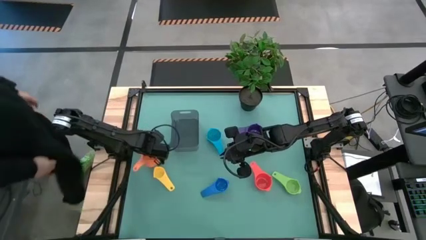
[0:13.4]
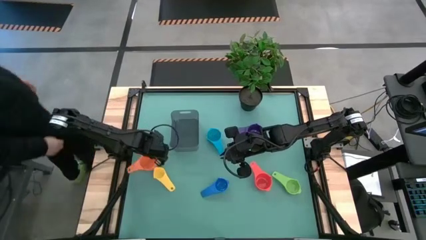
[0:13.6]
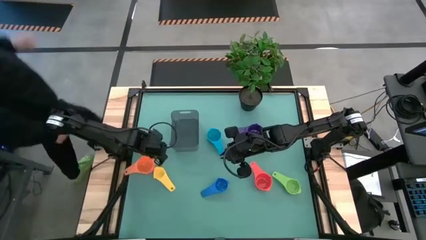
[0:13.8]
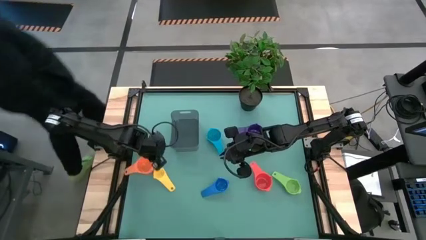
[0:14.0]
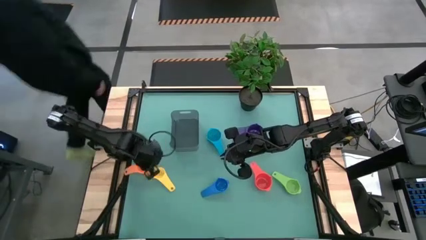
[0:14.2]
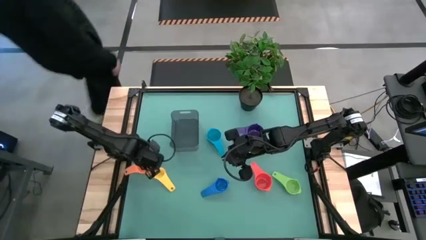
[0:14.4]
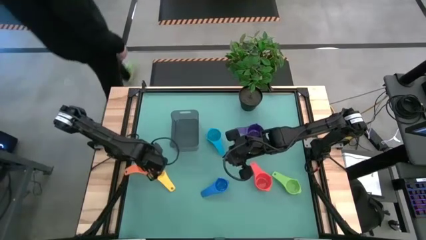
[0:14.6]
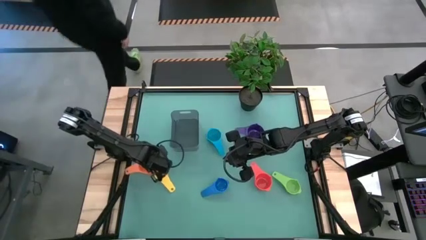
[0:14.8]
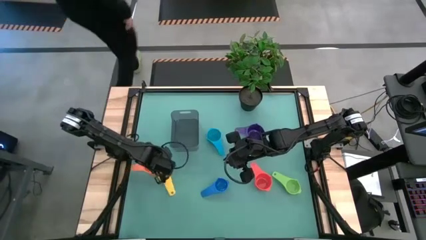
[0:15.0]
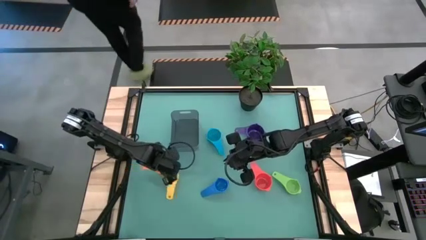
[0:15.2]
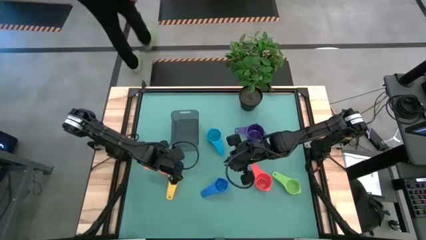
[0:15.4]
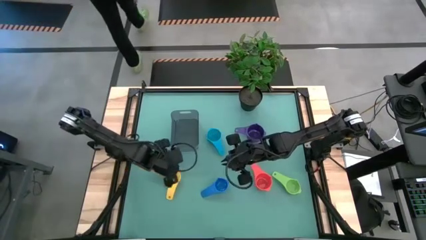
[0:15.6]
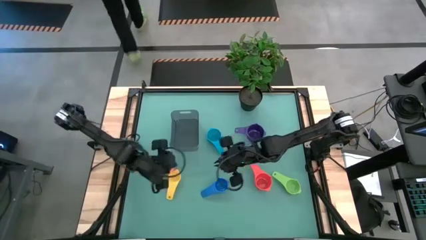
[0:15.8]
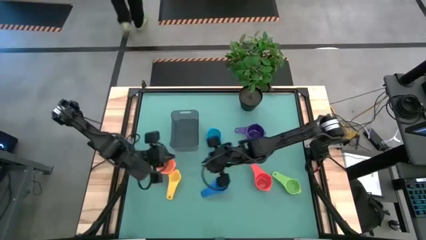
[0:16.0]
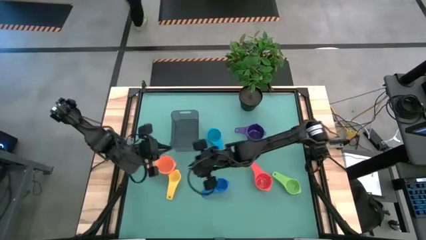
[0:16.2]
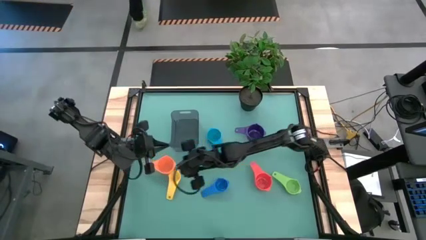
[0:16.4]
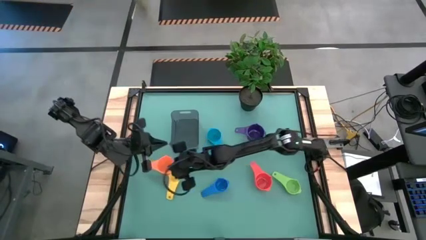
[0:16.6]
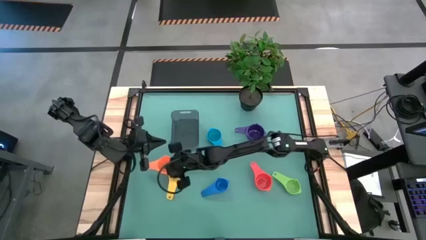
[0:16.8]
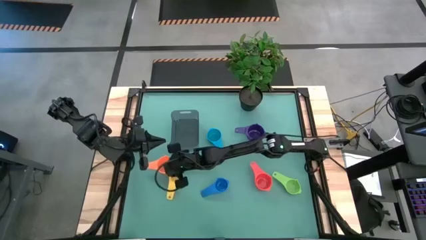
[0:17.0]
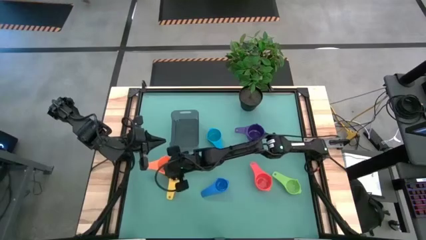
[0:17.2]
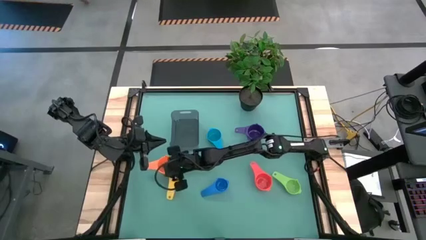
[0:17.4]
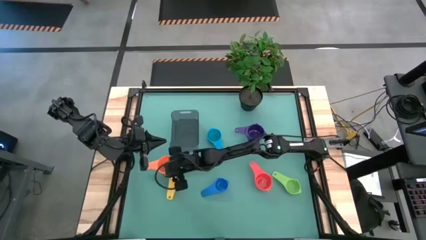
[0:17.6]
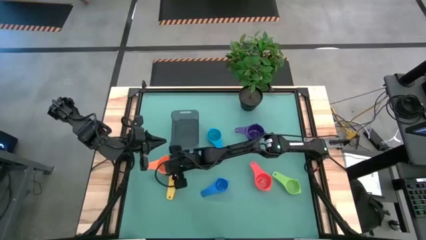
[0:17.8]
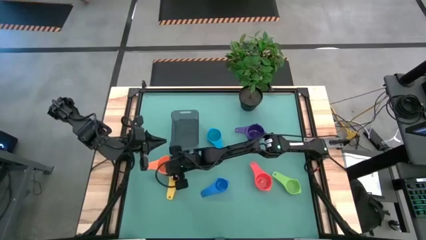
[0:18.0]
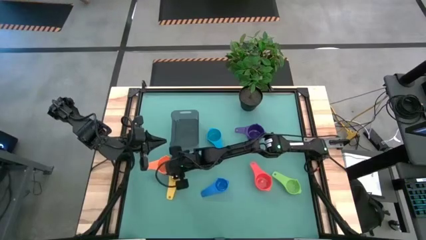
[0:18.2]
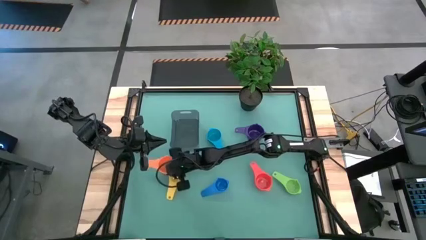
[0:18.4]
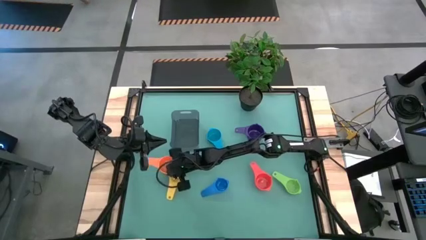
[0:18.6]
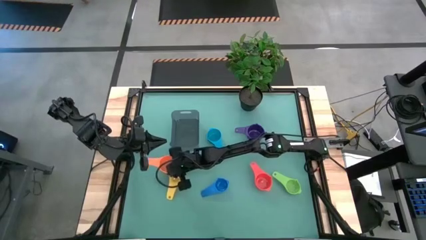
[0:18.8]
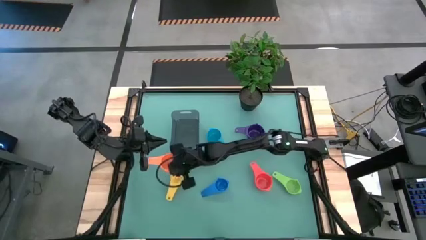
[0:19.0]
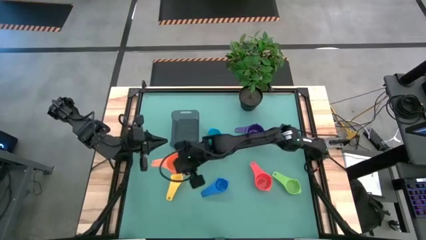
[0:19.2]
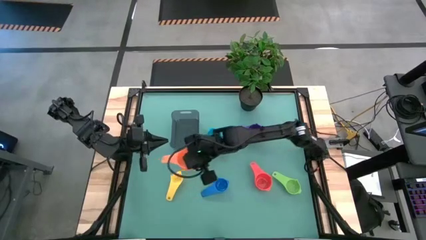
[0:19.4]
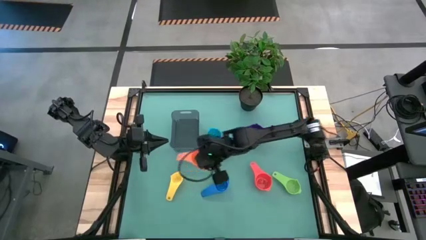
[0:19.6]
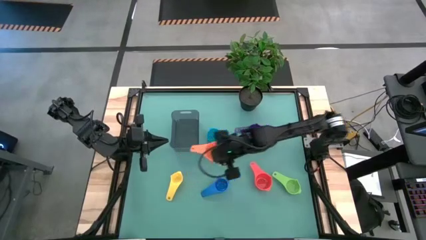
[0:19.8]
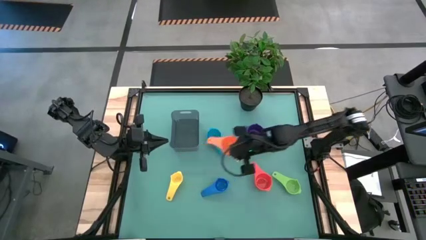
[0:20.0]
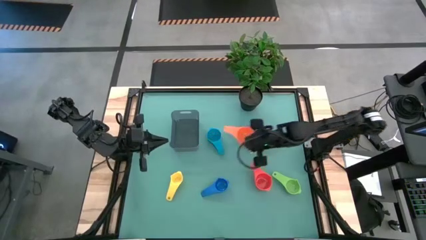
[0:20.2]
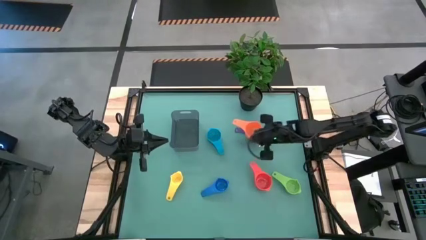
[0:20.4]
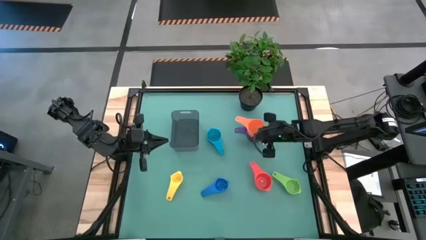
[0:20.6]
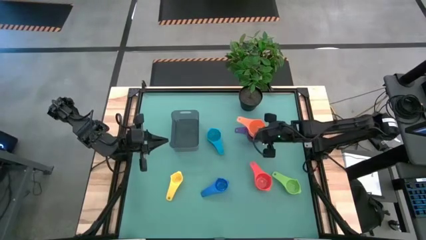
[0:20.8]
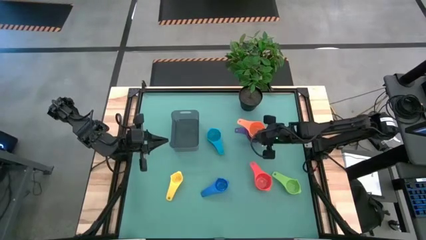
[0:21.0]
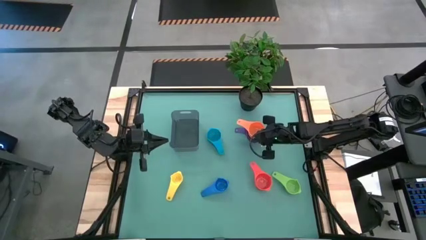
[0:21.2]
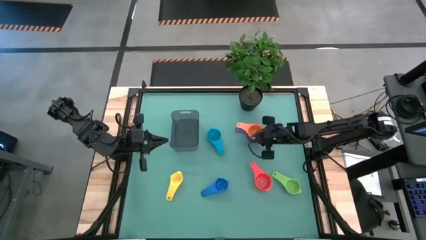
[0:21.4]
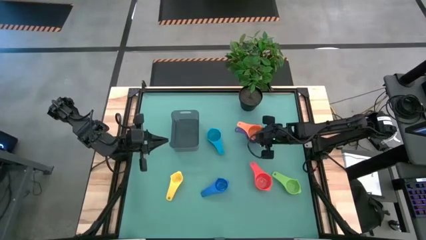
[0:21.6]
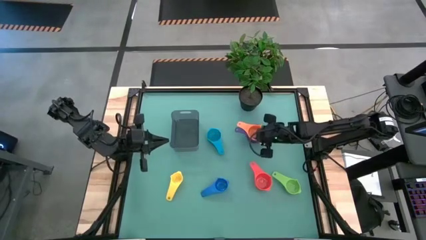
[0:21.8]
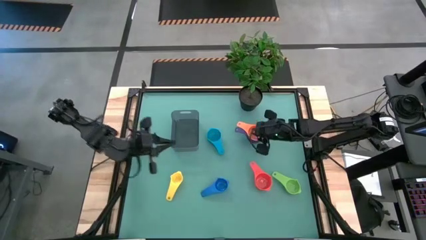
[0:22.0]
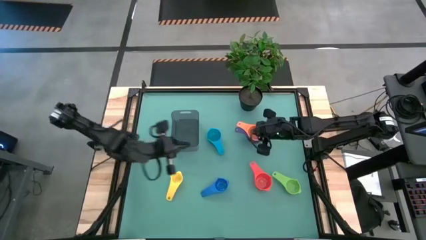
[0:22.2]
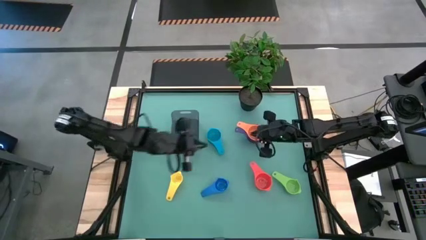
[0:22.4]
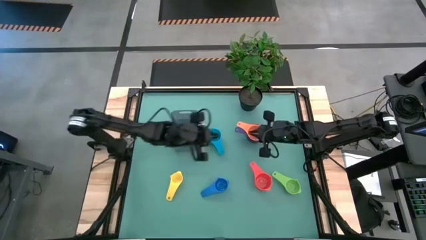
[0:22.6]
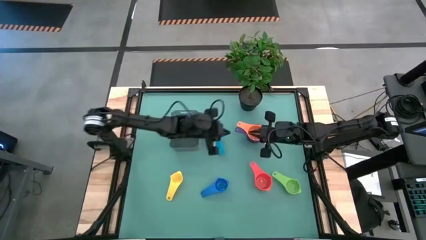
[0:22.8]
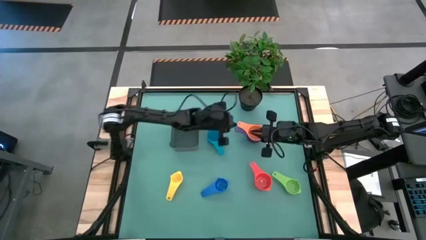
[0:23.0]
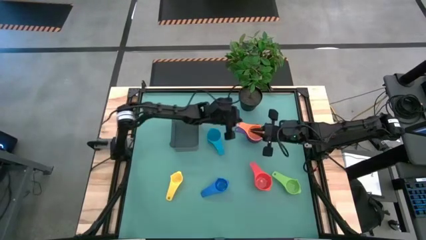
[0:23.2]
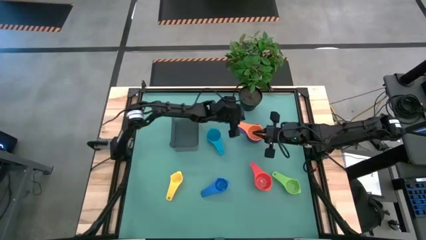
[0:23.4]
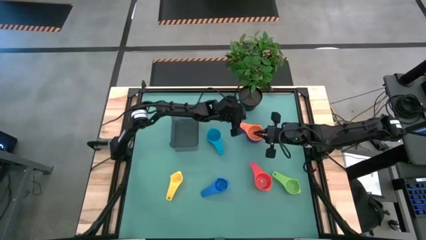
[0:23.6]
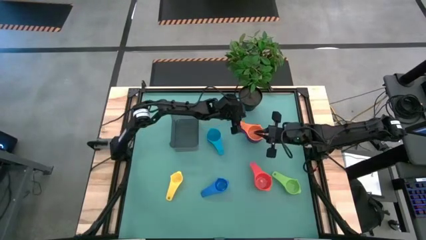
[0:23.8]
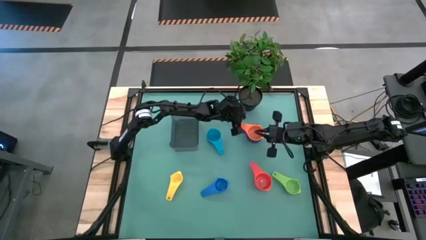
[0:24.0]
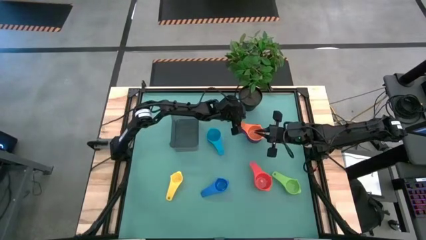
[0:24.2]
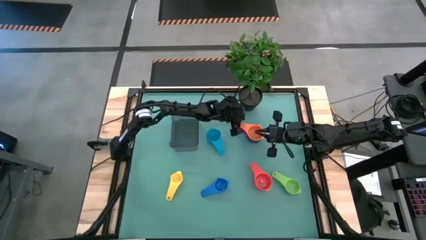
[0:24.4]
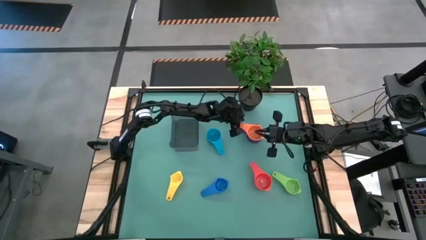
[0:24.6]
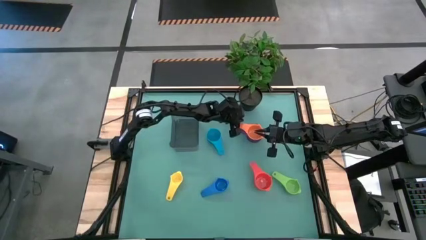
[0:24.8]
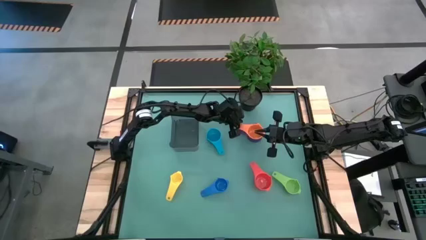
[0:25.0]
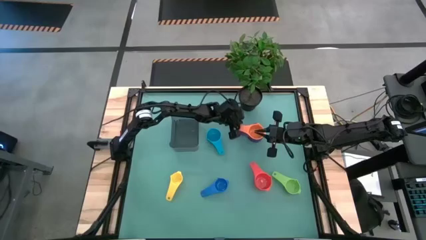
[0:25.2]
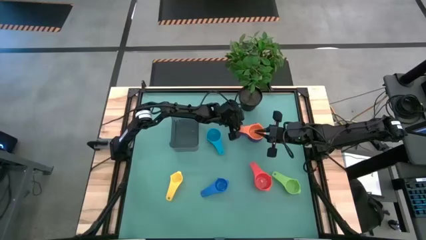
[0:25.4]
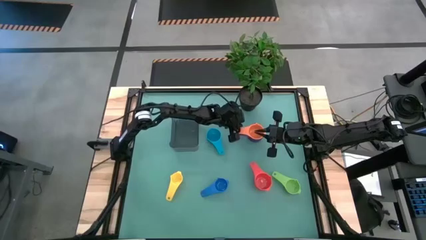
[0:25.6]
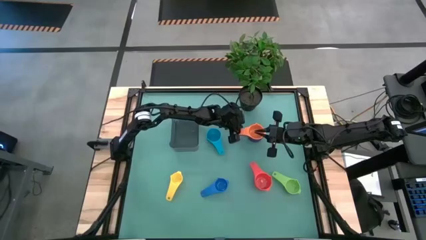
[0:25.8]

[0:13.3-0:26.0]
Task: Nest measuring cups in basket
Stack the orange measuring cup on top of the violet measuring cup
